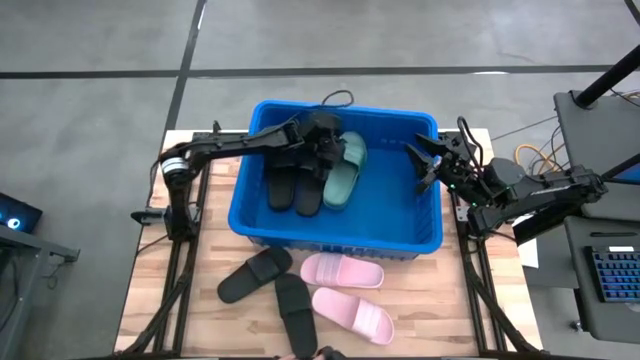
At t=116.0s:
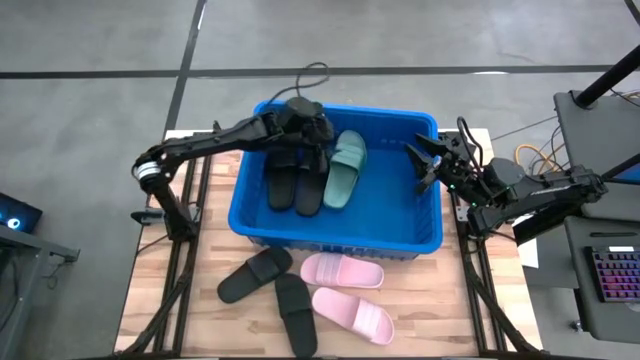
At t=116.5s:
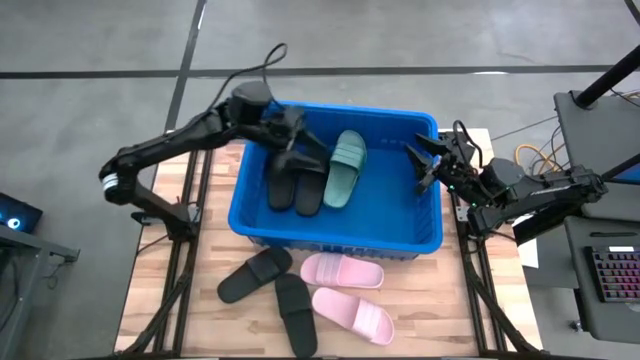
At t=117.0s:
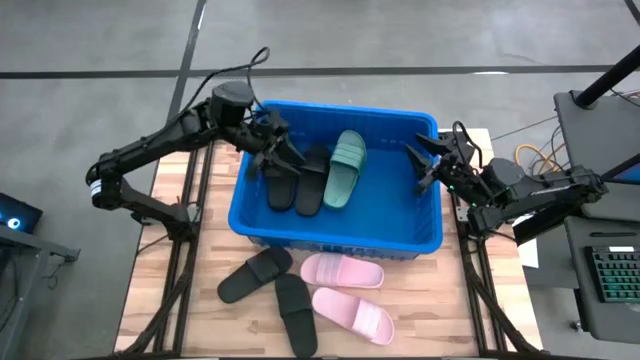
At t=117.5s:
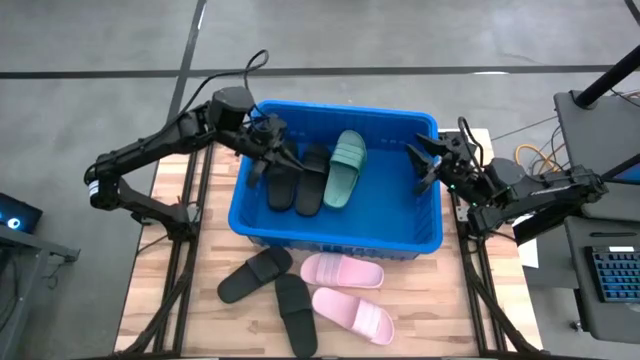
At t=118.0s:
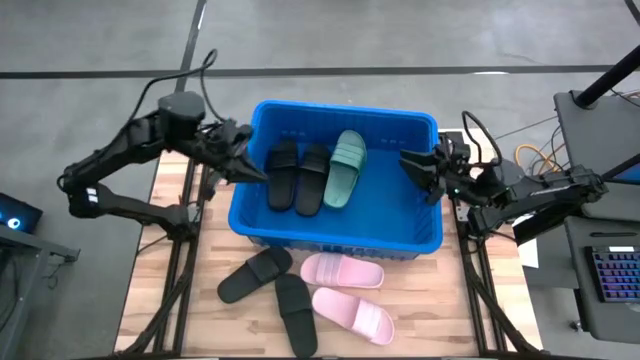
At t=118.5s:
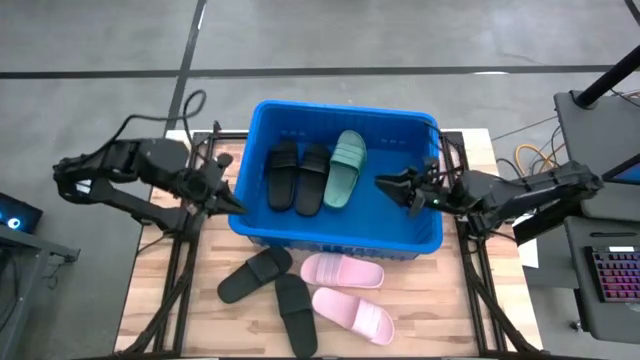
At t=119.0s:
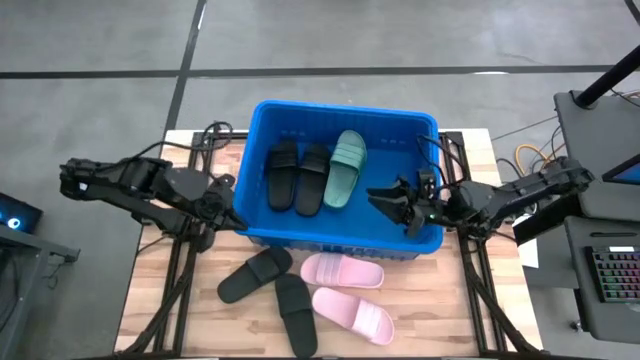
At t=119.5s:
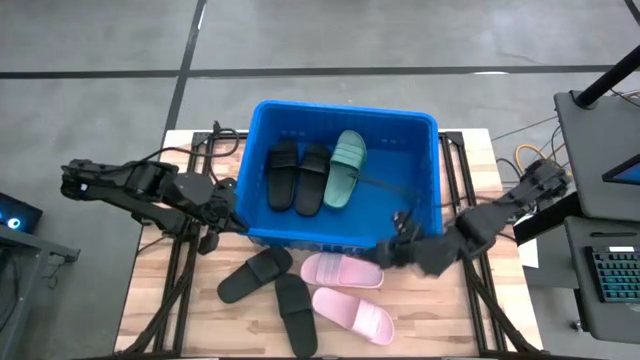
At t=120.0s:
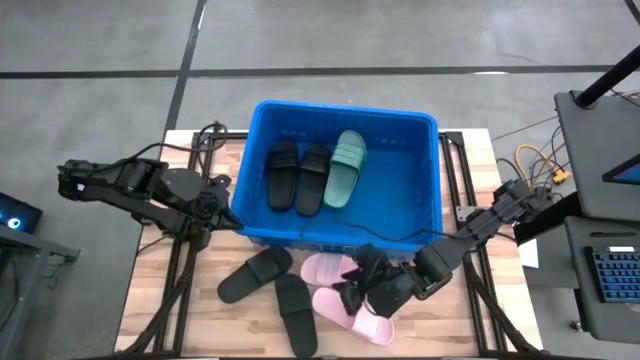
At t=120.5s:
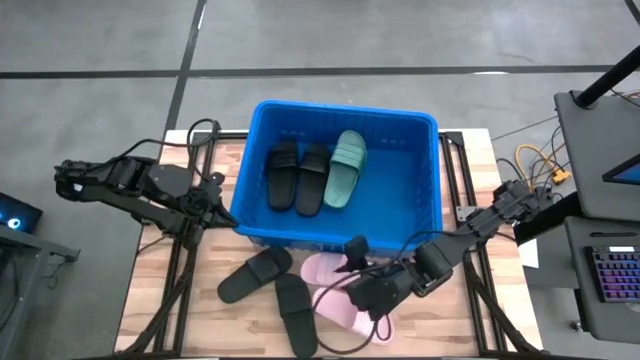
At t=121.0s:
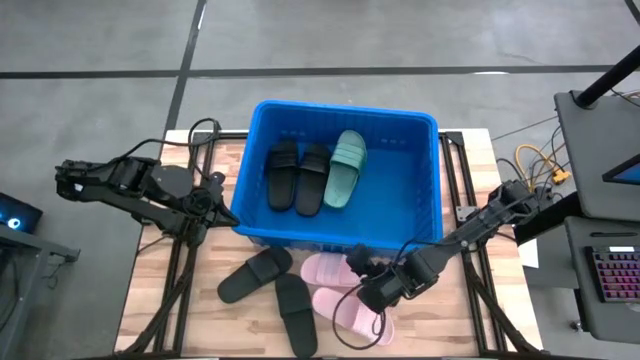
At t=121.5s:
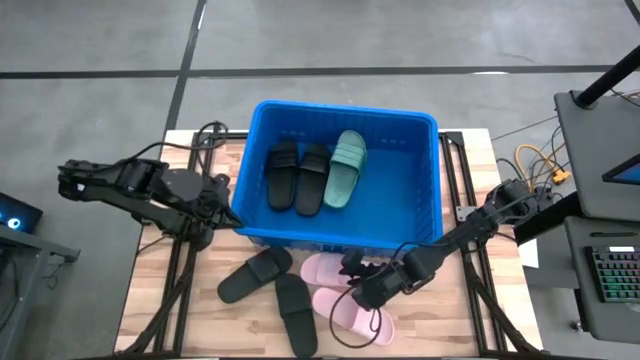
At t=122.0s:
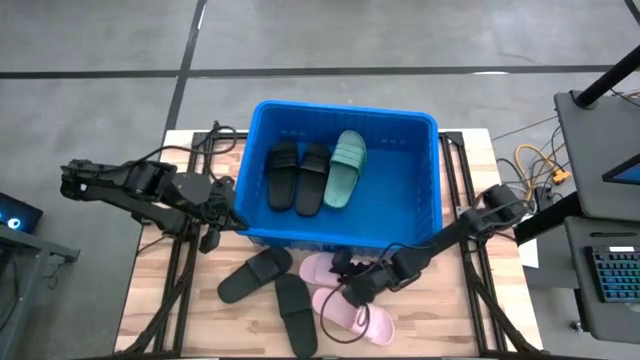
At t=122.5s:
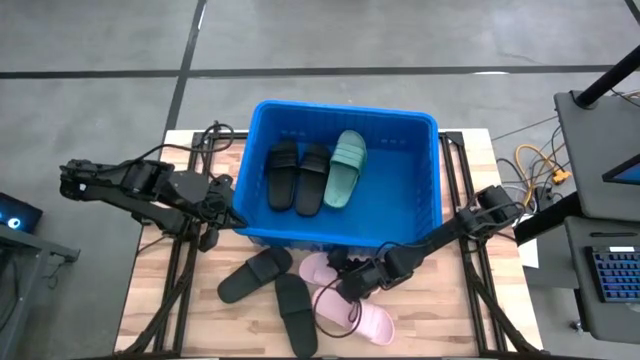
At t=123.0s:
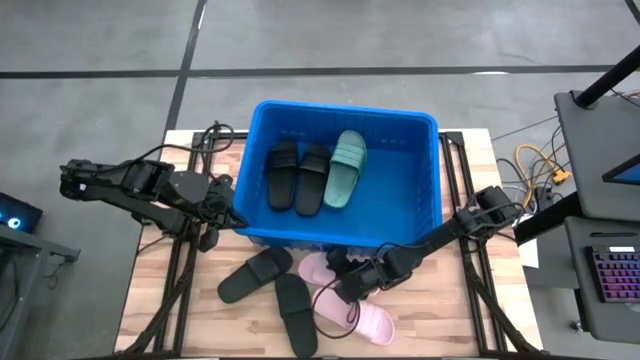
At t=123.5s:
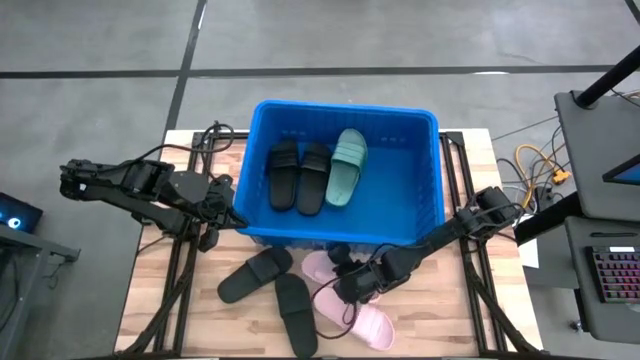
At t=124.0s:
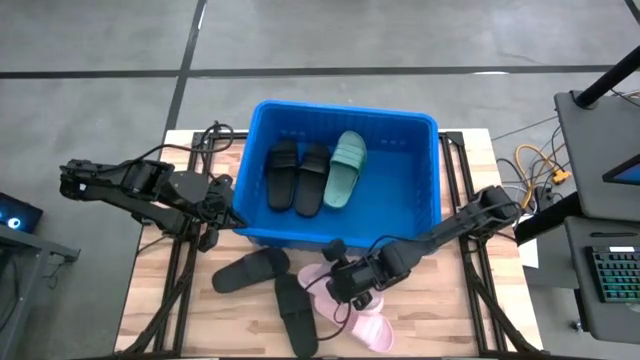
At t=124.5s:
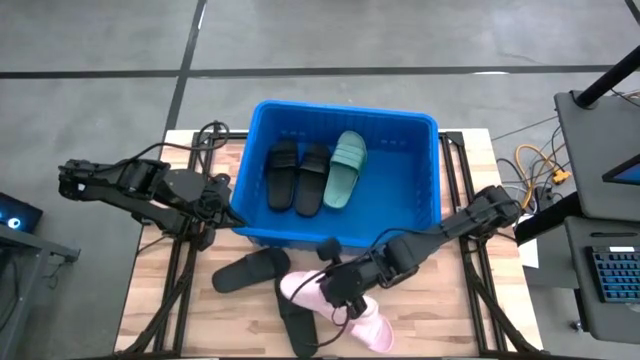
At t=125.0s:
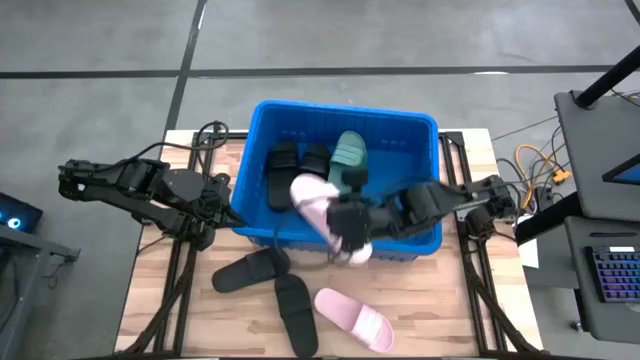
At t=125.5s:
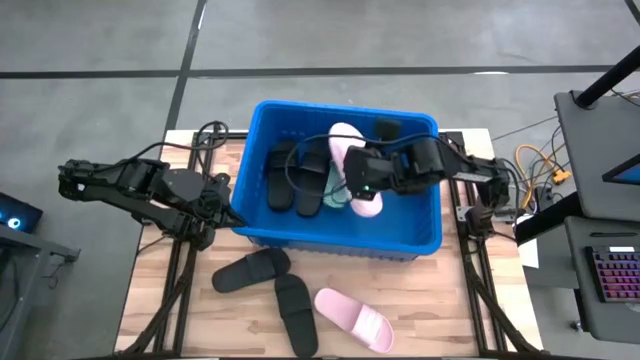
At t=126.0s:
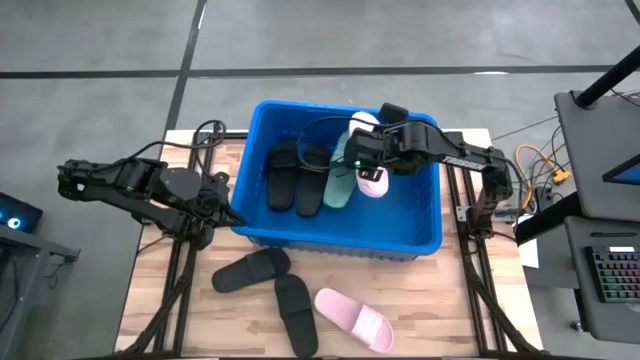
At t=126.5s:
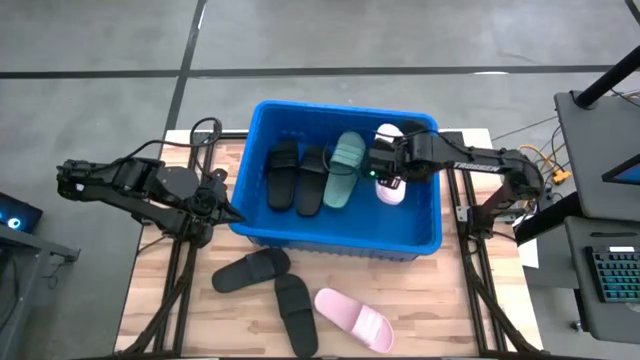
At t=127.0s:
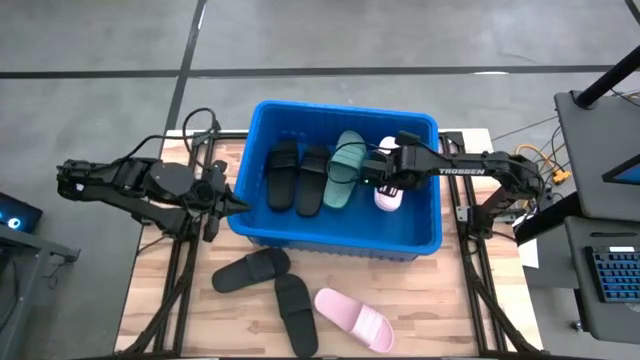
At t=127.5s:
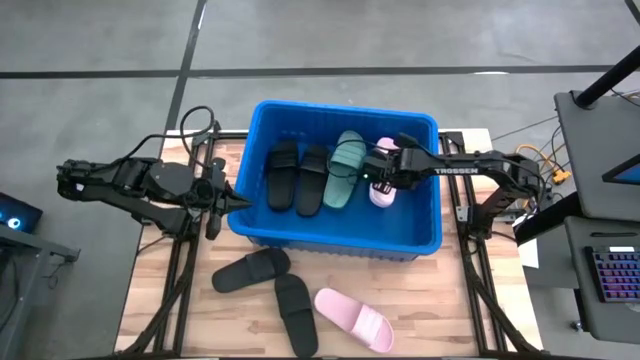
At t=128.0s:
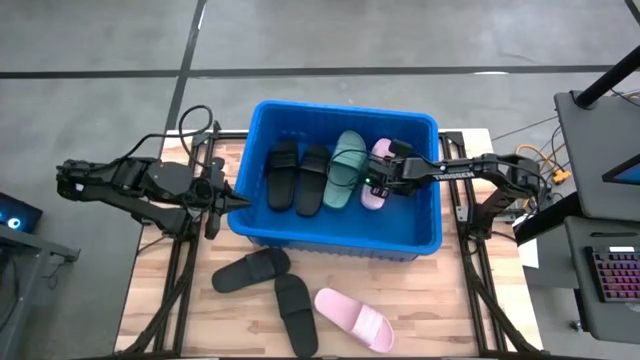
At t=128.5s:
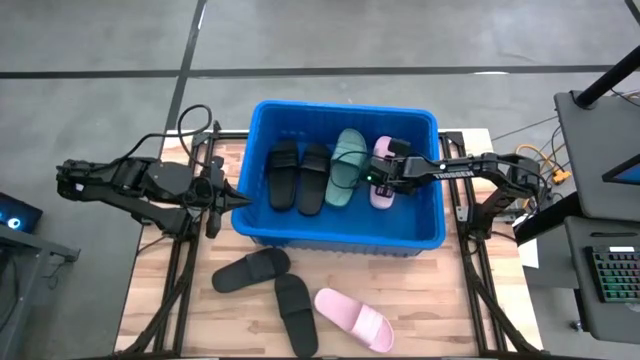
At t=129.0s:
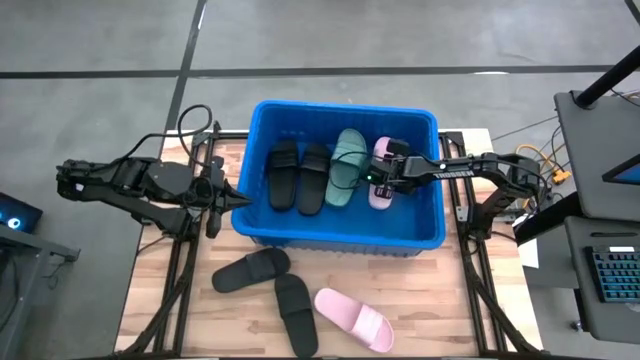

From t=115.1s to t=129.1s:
Task: Pick and place slides into bin
Put the top pink slide into the blue bin

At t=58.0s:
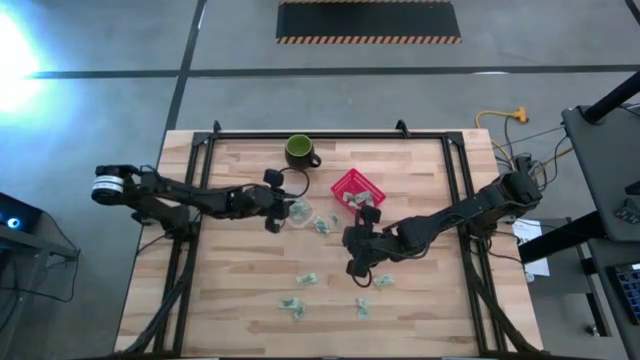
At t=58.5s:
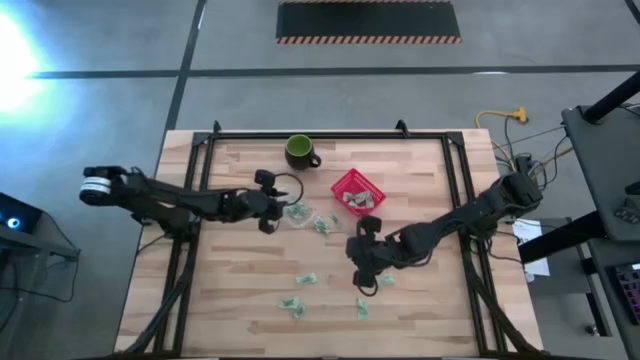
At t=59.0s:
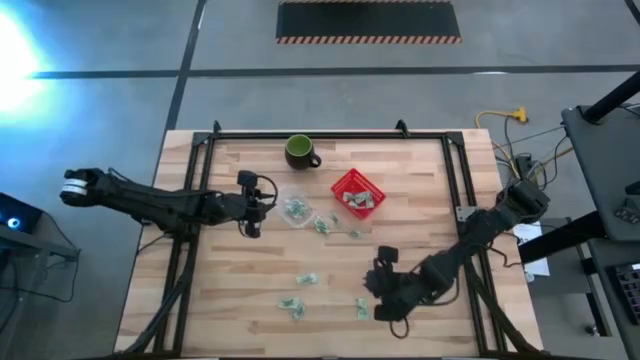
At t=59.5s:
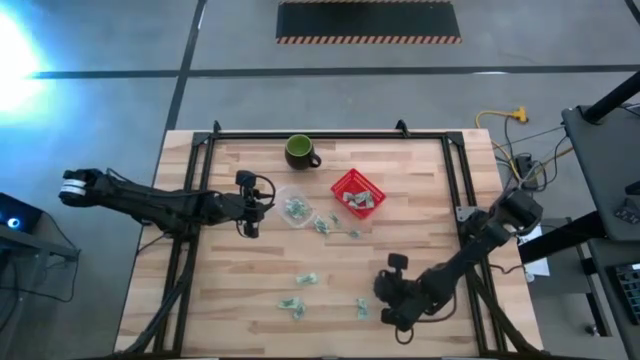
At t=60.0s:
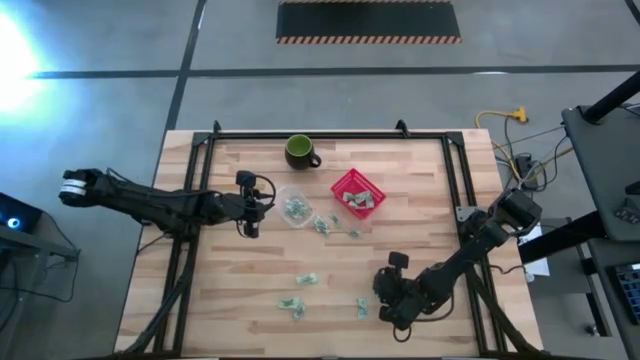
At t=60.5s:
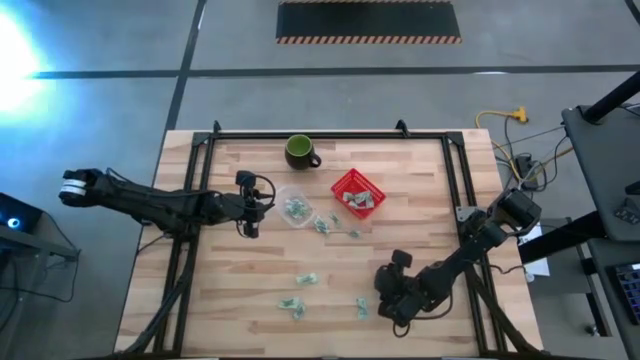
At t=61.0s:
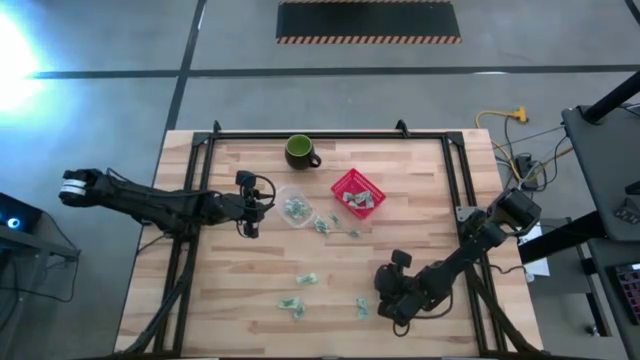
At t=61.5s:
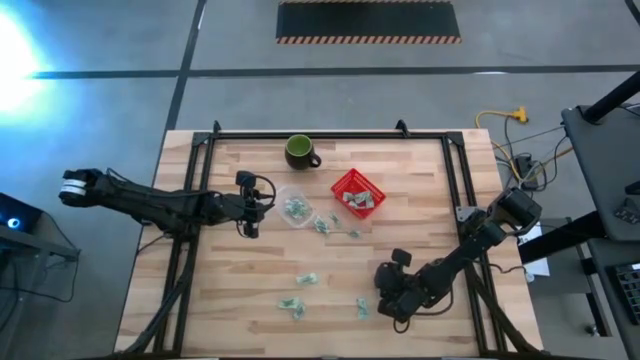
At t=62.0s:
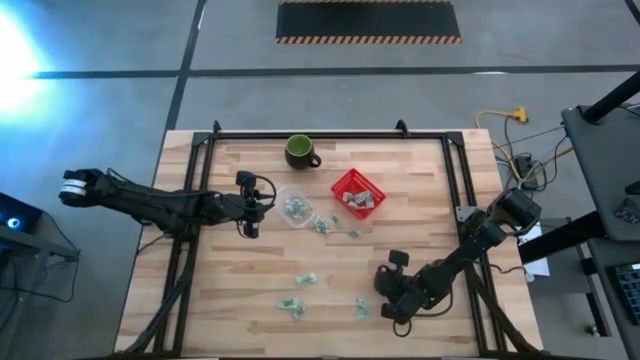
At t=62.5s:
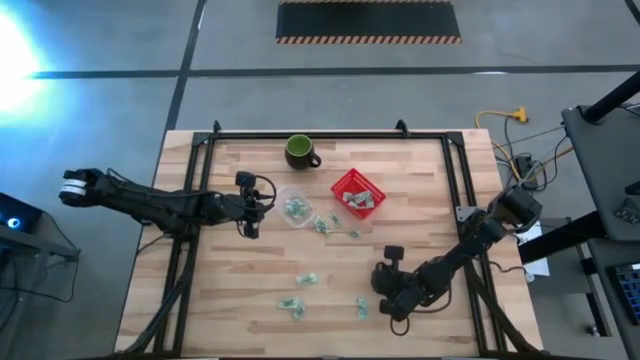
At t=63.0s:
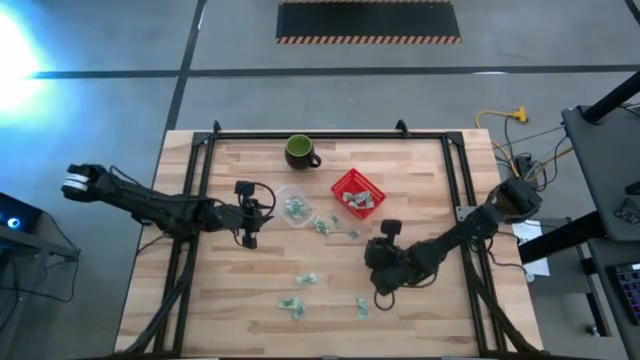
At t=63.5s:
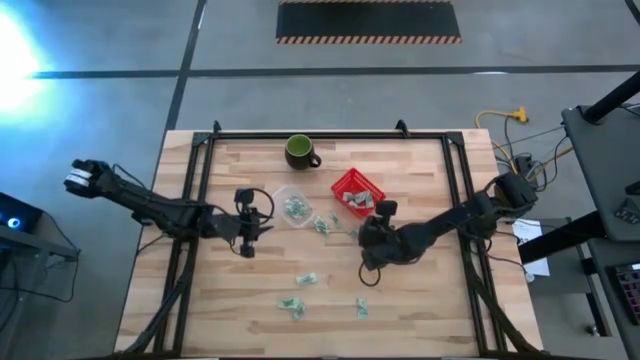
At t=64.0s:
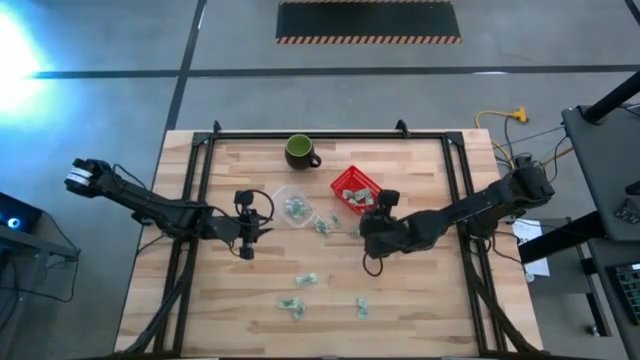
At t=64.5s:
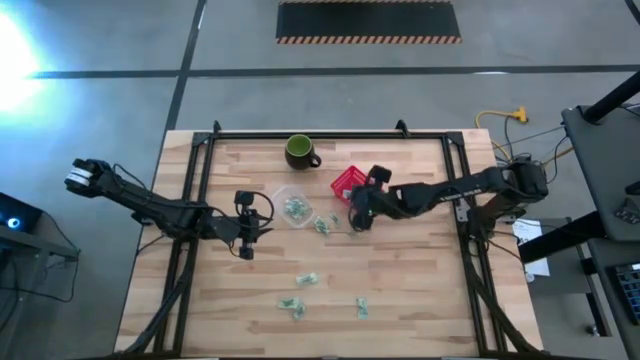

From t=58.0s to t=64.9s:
Task: Pick and place items into bin
Put the stevia packet into the red bin
